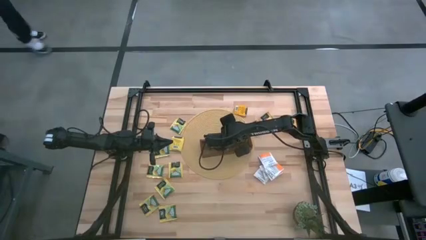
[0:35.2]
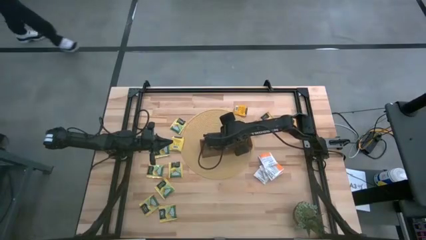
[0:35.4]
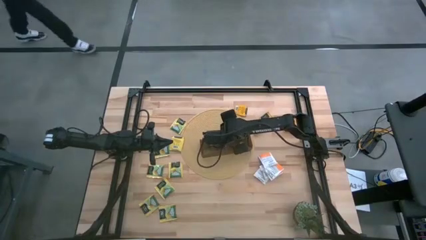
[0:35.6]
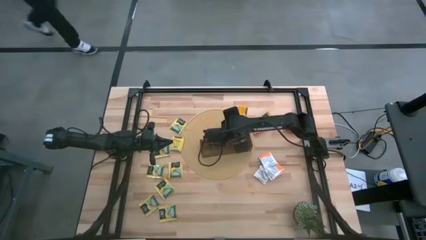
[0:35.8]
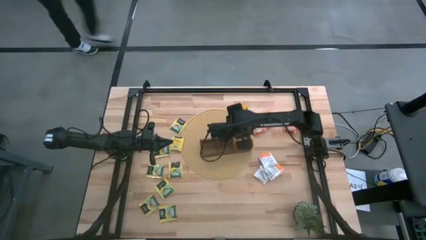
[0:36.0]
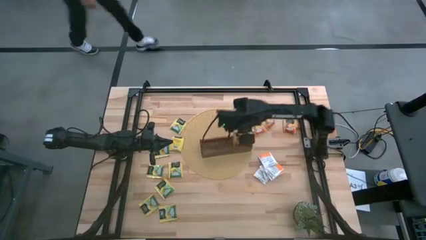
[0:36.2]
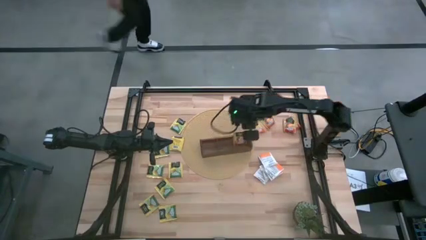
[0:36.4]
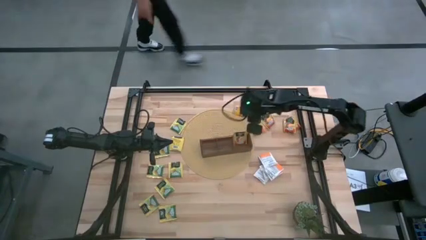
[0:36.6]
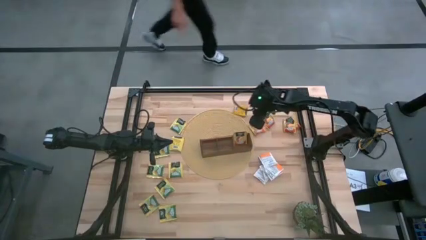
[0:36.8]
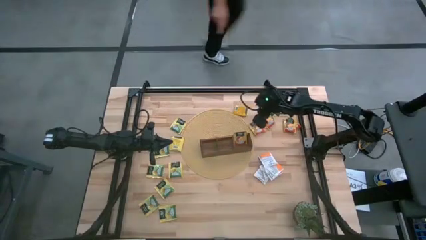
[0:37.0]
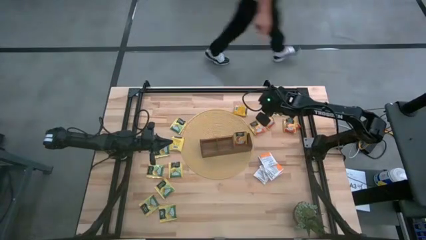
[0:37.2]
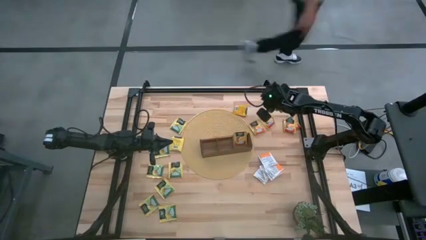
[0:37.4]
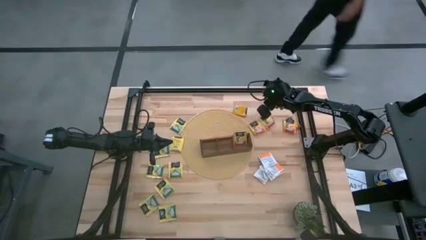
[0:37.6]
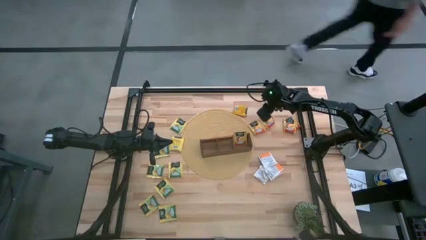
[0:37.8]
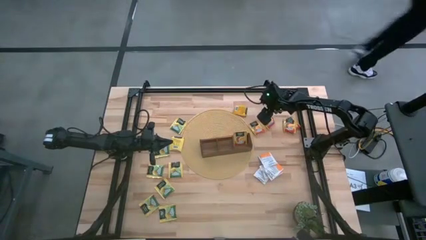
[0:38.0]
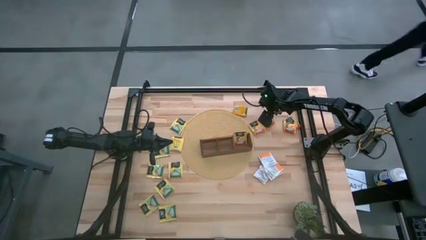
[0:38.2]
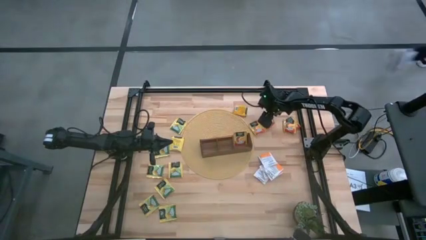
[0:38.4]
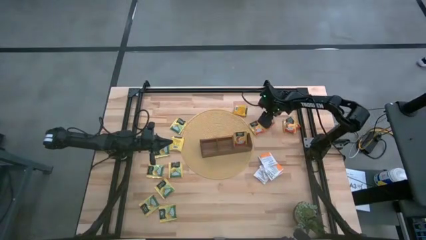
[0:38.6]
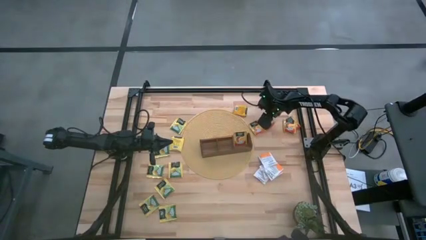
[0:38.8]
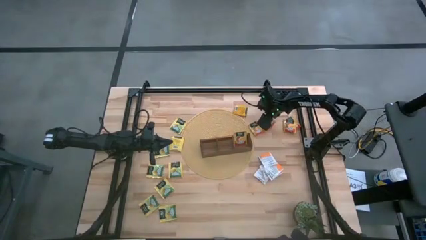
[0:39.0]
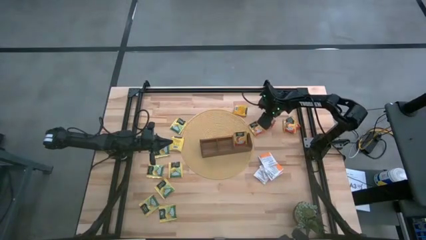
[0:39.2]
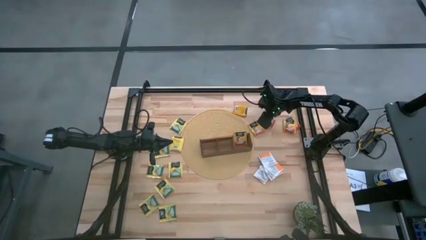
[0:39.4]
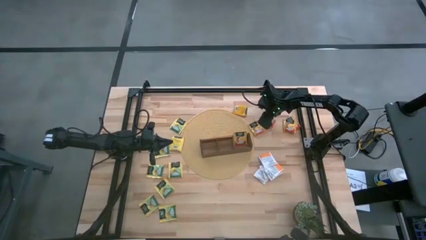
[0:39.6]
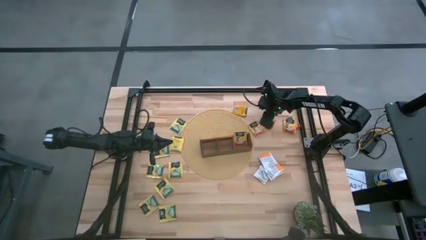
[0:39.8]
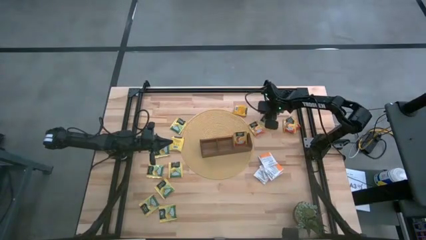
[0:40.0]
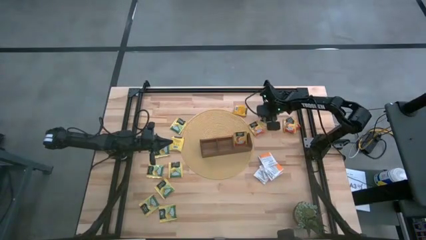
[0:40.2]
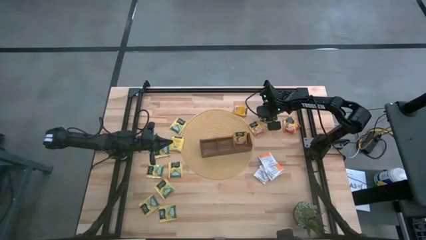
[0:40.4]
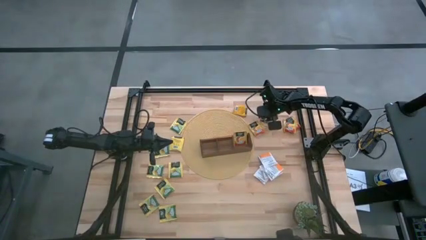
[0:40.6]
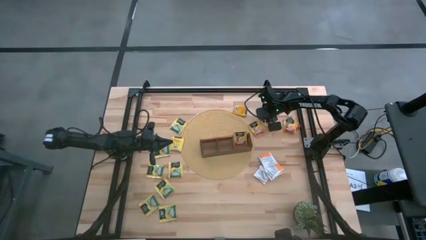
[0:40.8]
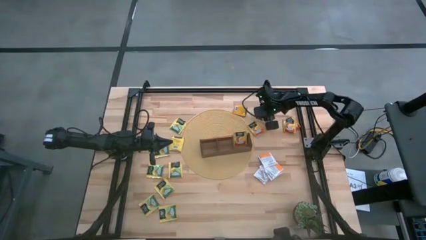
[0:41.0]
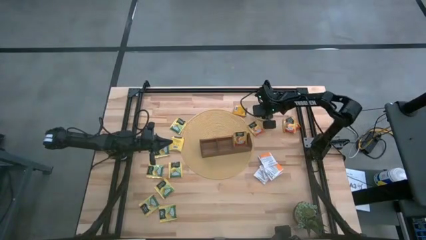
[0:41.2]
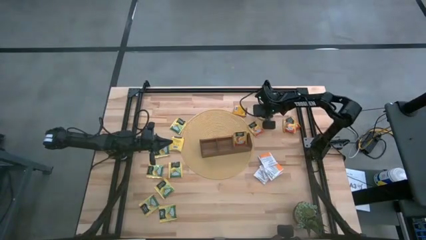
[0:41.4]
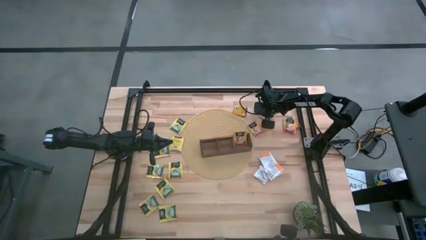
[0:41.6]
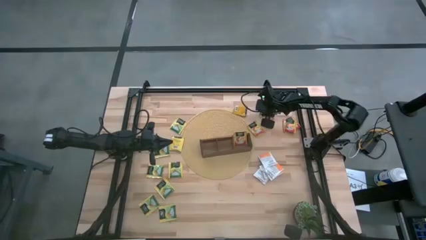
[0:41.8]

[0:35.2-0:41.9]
Task: Pick & Place Tea
Put the orange tea bag into the right section of the wooden organizer

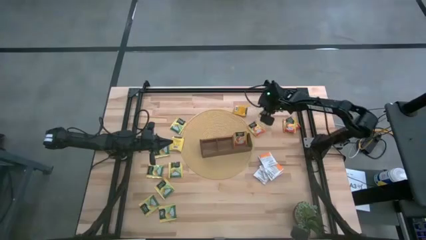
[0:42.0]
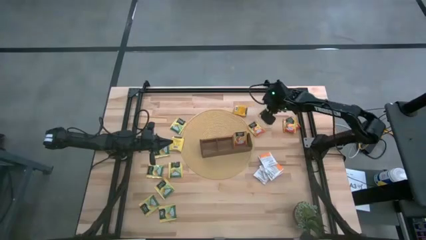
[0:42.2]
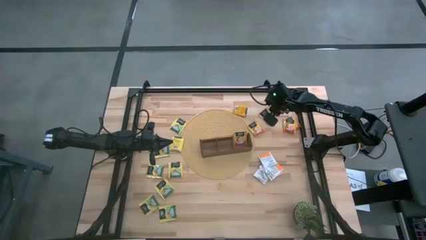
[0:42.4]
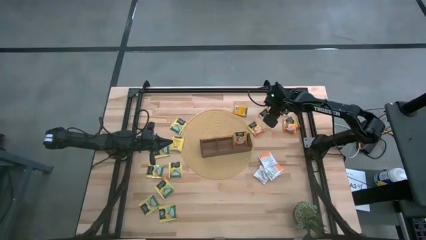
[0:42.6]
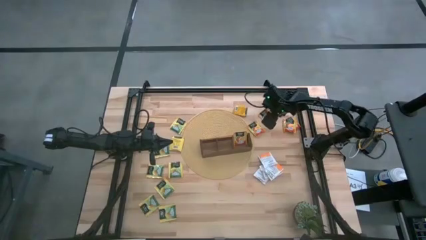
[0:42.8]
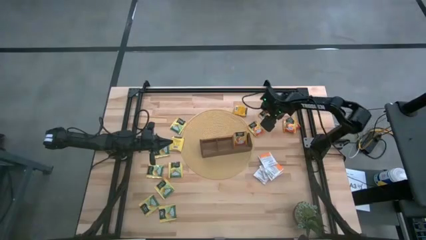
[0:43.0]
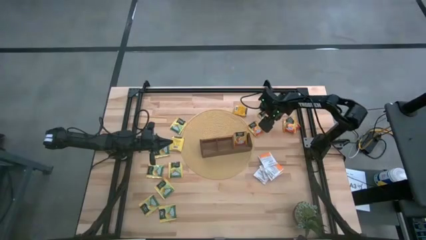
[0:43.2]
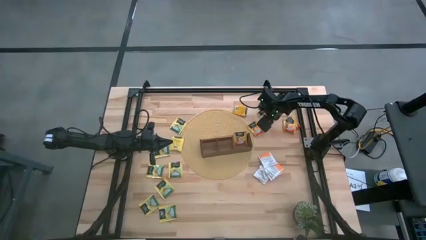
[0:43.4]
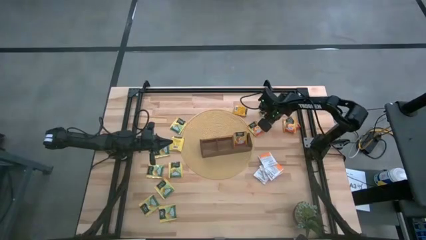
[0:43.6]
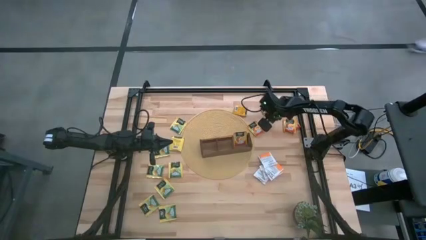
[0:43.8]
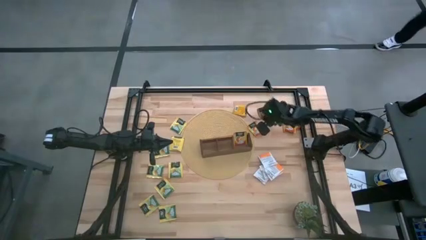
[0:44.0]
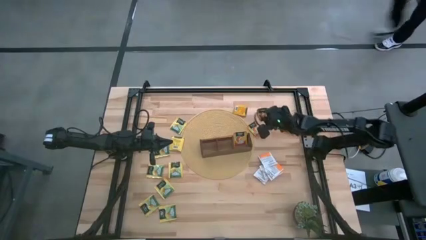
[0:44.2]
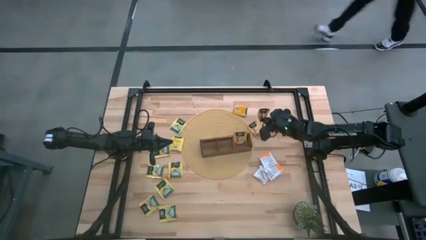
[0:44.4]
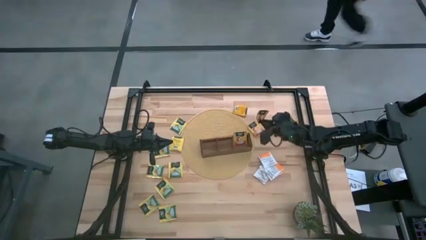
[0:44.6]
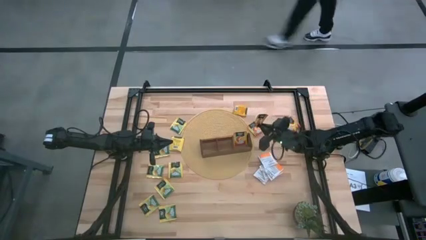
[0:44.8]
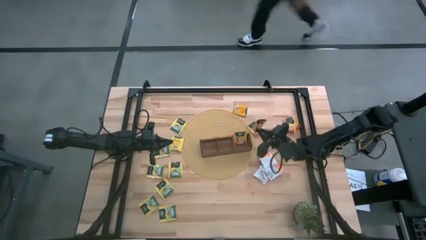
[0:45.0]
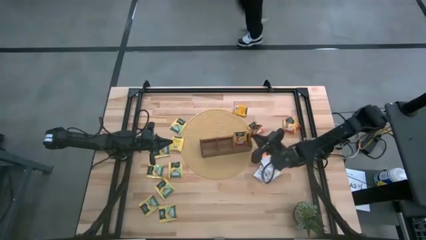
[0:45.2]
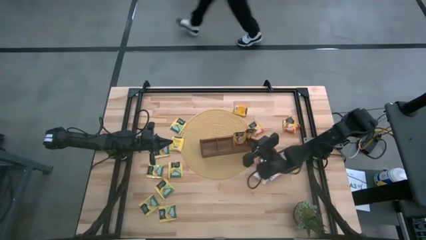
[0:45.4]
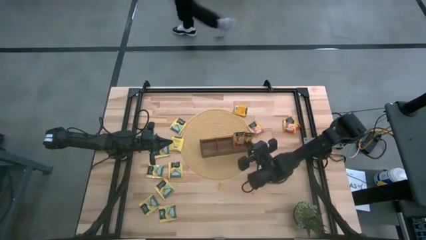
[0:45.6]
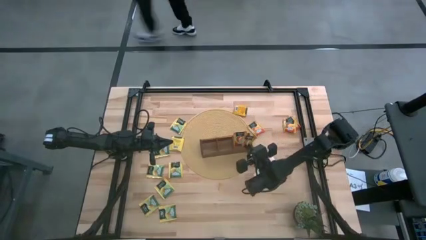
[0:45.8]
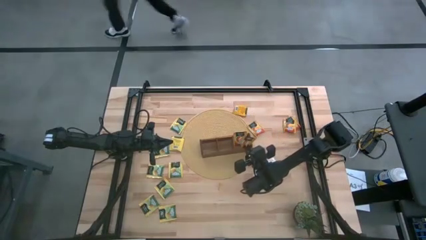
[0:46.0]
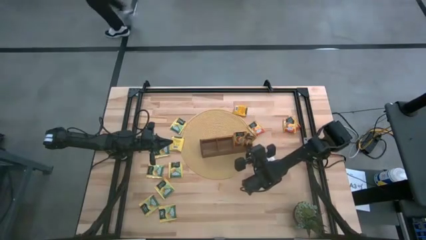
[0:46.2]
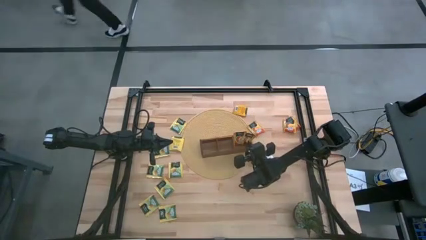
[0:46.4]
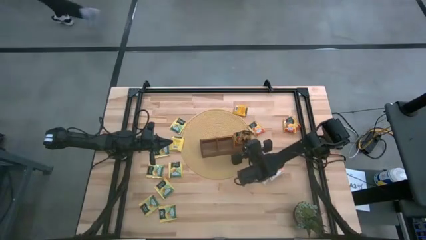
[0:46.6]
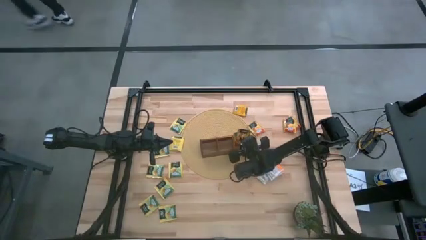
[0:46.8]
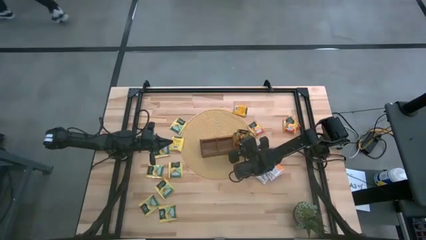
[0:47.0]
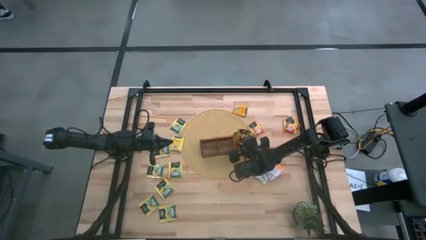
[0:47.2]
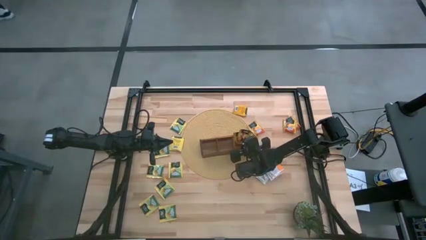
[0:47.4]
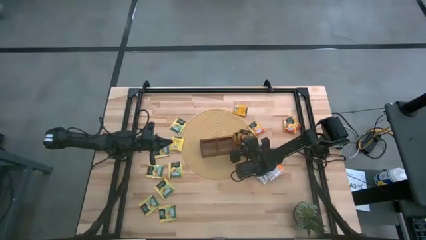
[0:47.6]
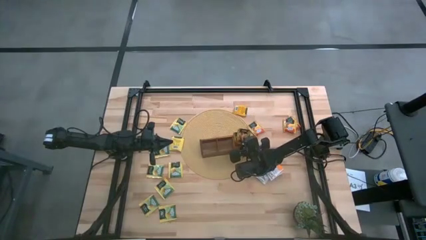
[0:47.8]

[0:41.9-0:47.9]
Put the orange tea bag into the right section of the wooden organizer
